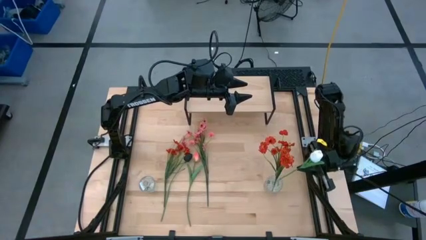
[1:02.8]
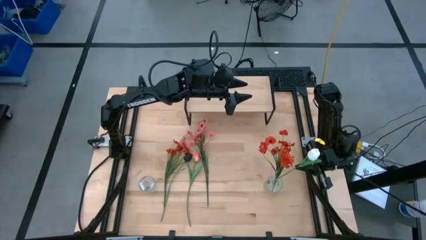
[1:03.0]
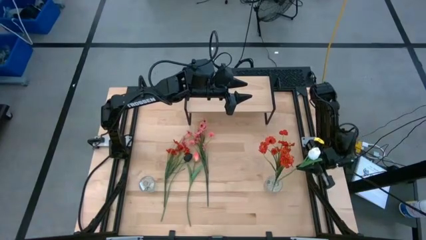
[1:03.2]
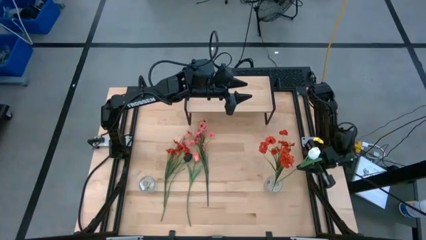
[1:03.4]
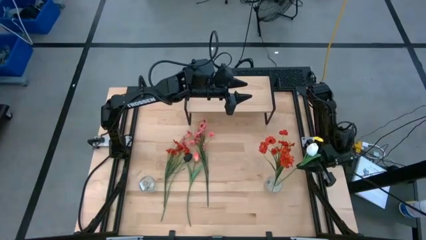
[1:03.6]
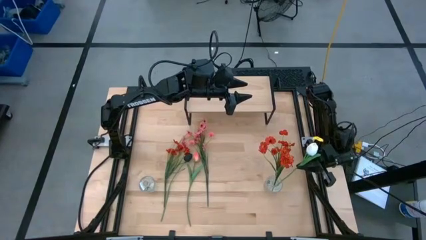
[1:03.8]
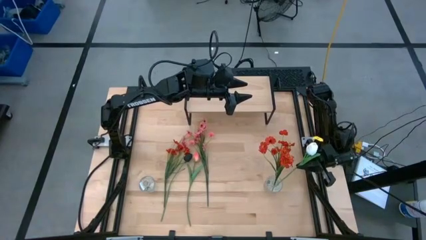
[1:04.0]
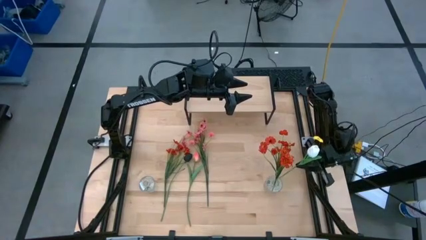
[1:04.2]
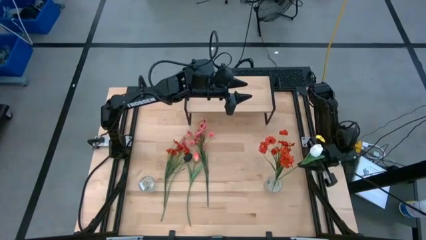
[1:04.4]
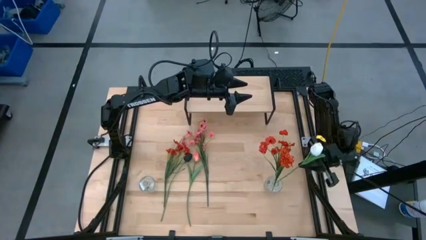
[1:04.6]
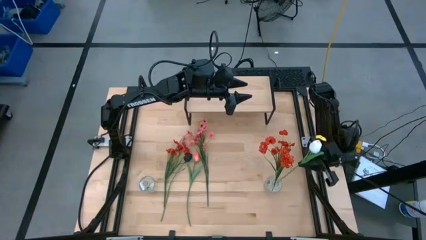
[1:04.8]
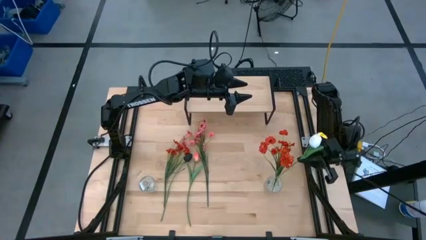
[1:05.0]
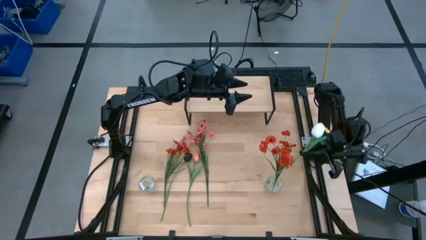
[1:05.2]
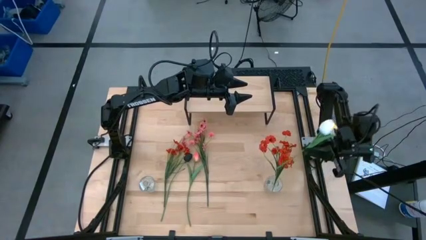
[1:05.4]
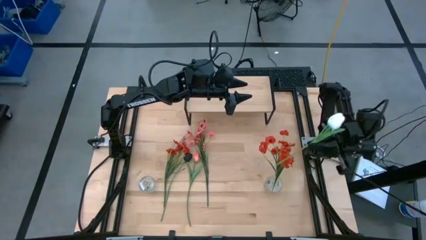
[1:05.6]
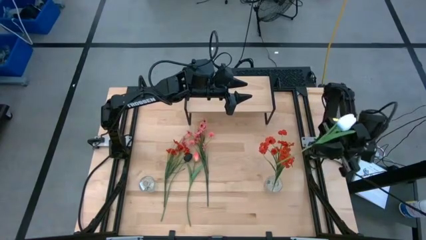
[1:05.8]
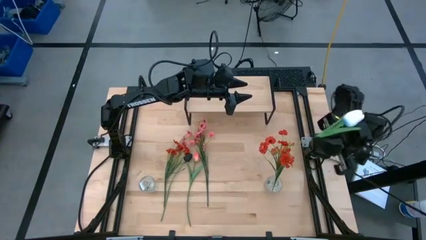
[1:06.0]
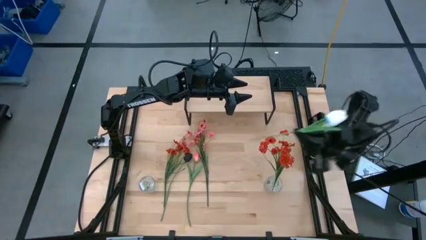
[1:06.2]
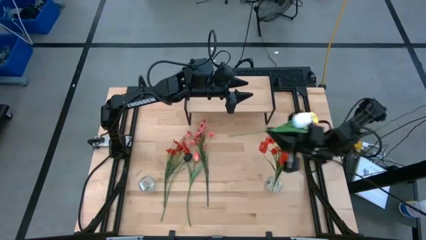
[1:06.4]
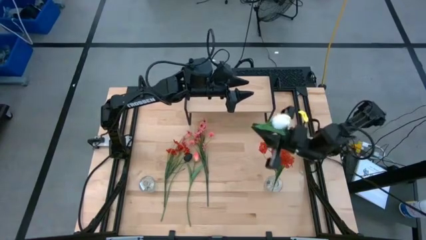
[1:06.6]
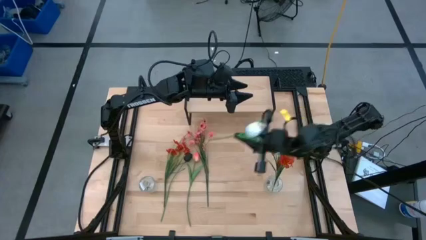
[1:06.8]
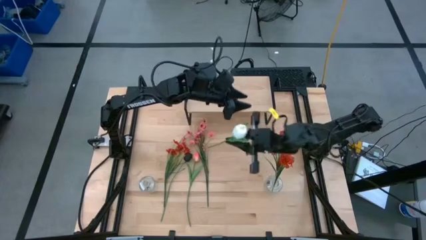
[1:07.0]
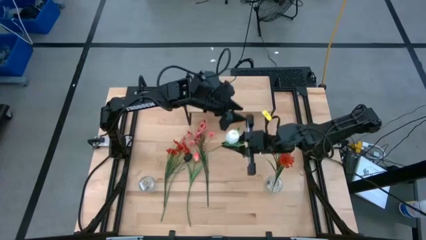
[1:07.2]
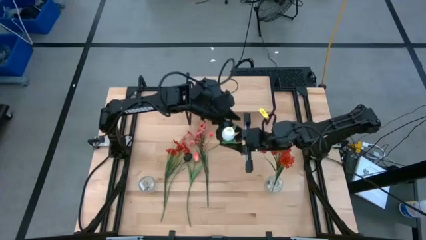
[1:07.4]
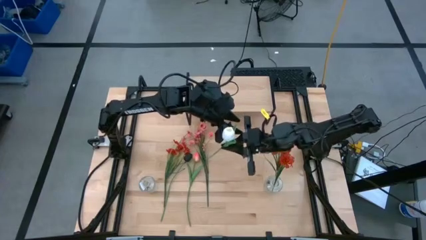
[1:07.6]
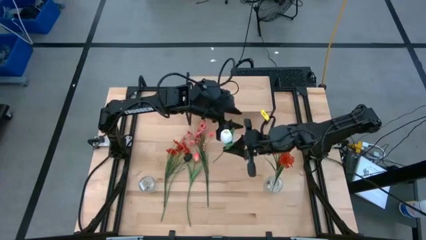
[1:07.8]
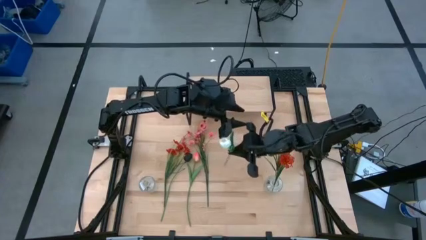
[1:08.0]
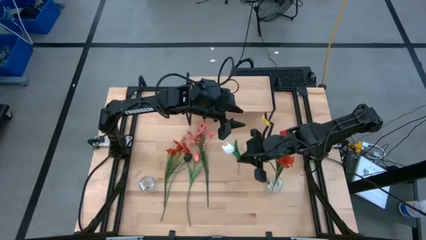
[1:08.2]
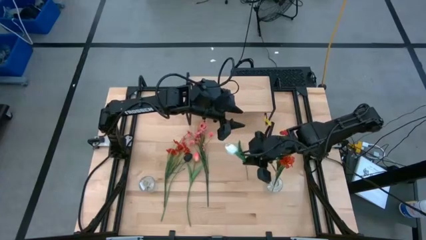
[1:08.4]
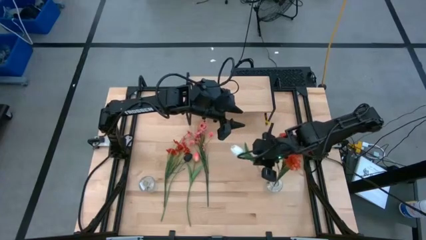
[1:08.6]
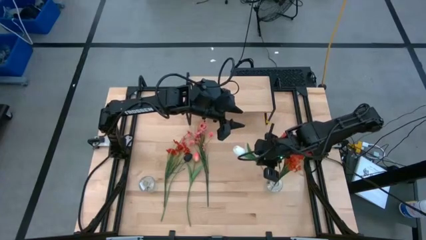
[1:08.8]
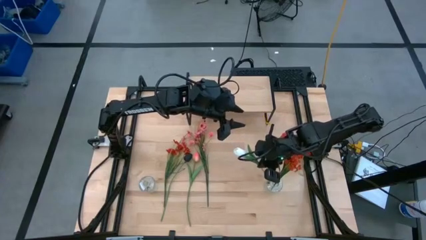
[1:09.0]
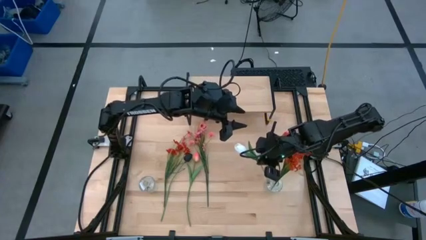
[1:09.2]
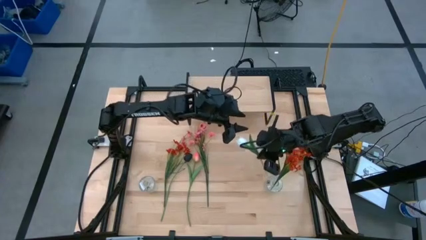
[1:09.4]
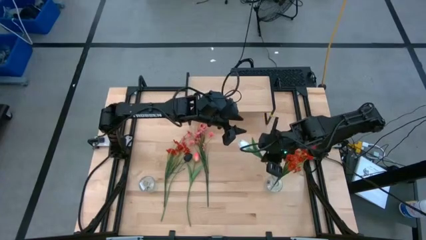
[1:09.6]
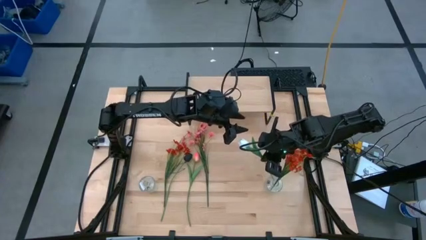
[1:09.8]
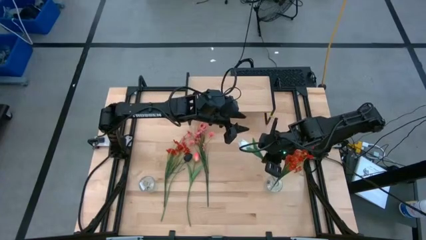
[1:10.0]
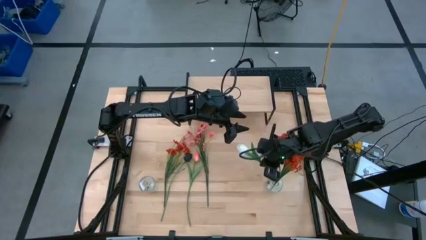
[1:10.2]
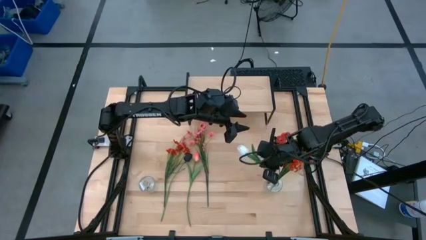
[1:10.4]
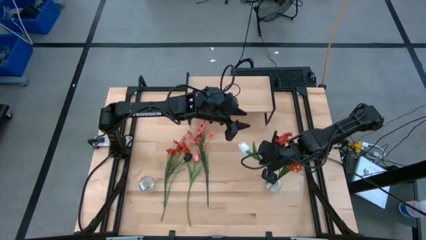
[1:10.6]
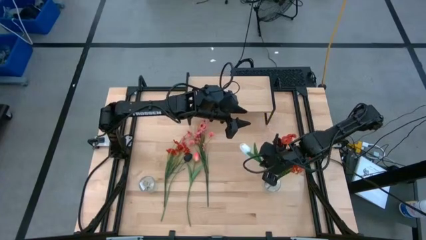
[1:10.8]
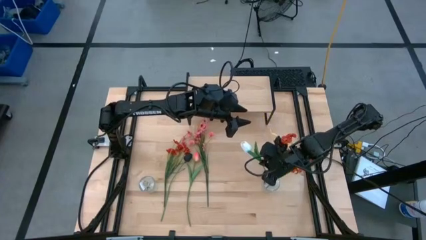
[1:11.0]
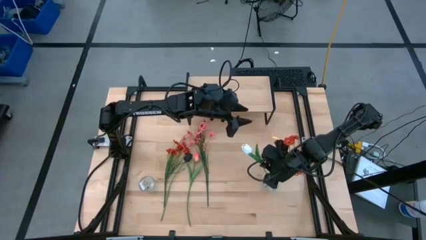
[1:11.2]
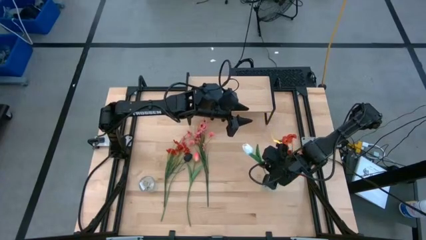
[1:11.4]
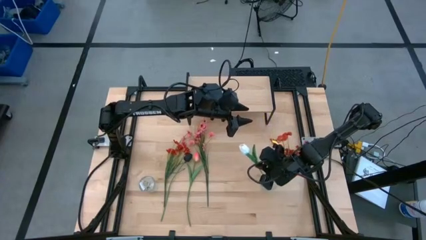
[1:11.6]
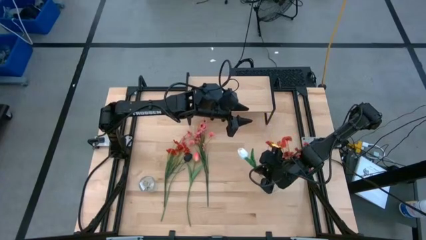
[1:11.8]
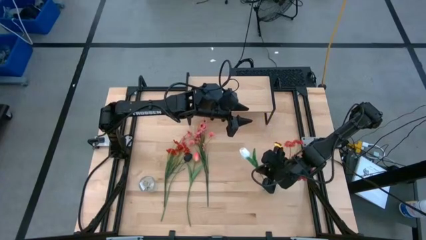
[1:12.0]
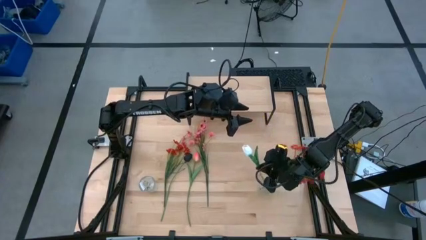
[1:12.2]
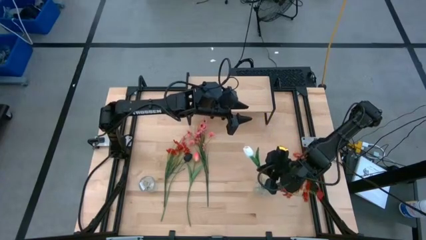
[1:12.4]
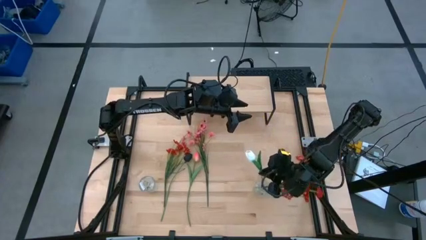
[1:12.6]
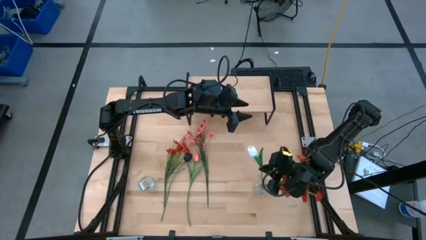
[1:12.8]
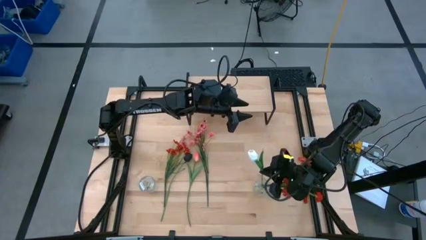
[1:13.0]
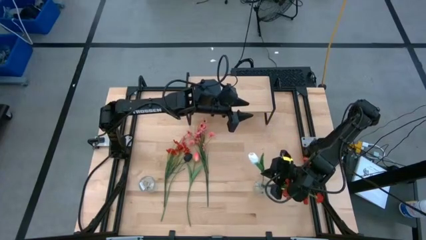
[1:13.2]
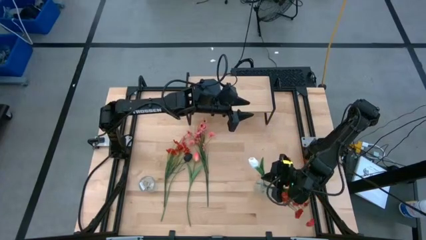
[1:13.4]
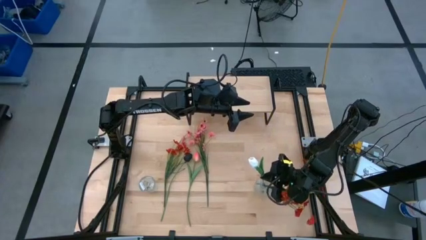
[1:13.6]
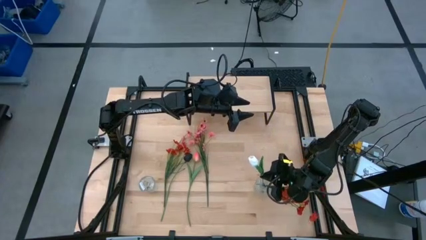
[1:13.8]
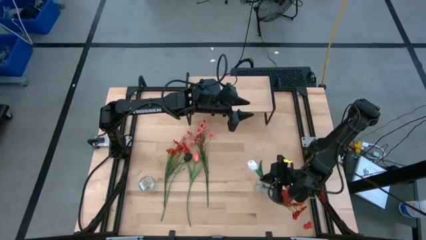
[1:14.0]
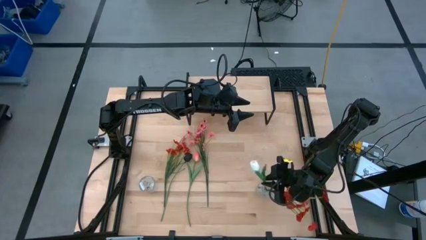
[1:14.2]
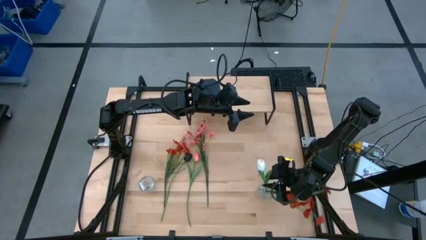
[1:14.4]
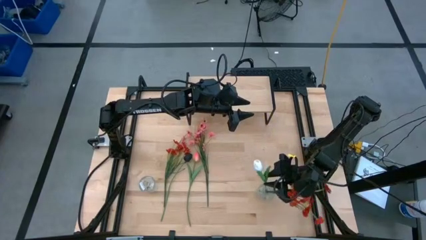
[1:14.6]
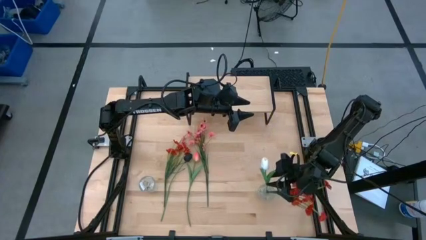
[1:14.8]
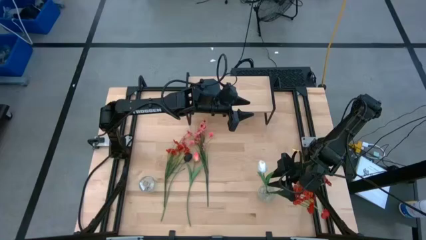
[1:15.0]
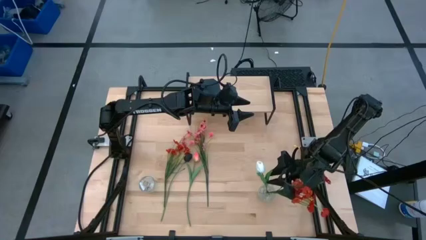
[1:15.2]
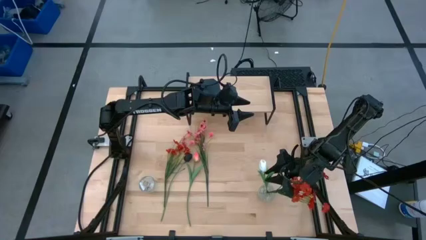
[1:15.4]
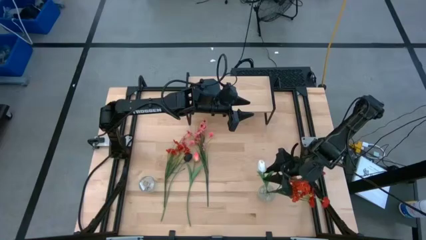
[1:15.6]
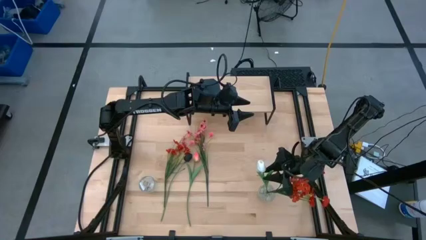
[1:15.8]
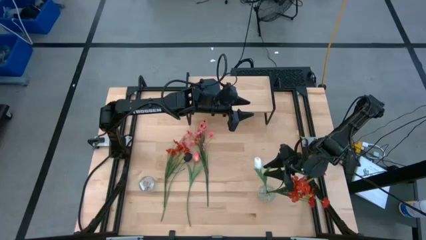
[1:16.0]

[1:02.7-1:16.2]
Task: Pick and place flowers into a vace then onto a shelf
Put the white flower into the right transparent vase

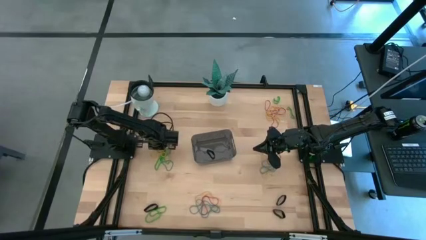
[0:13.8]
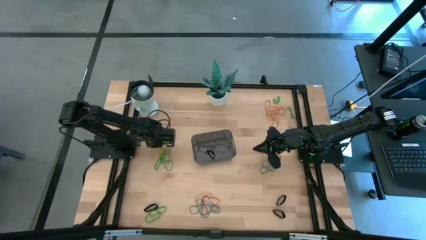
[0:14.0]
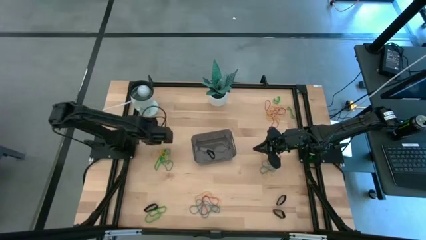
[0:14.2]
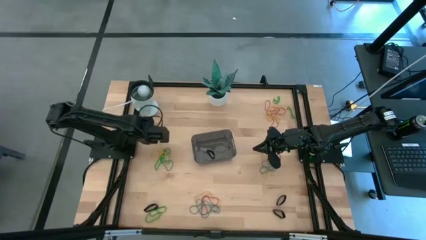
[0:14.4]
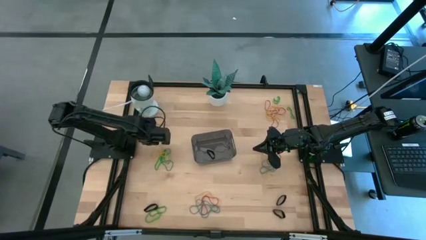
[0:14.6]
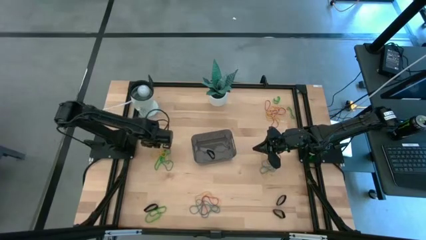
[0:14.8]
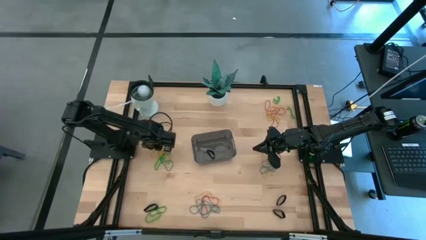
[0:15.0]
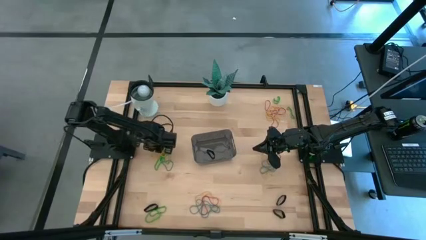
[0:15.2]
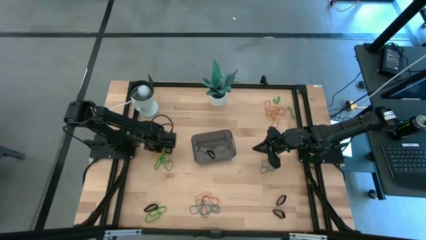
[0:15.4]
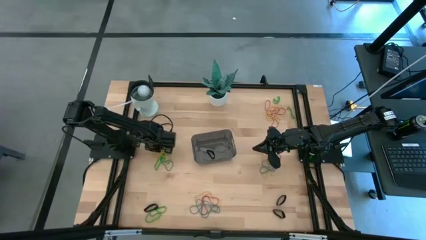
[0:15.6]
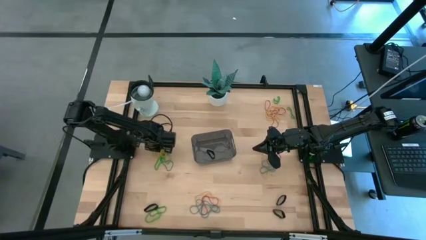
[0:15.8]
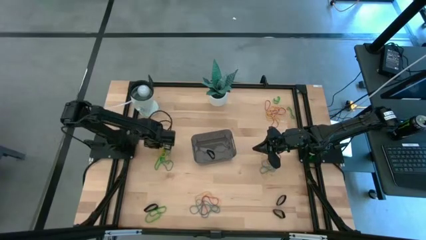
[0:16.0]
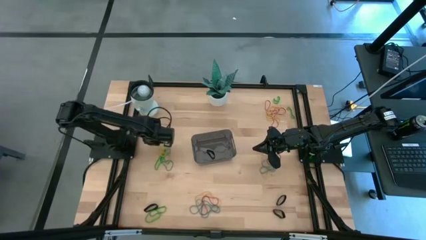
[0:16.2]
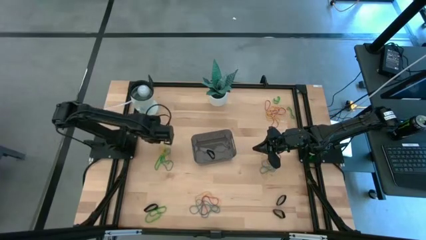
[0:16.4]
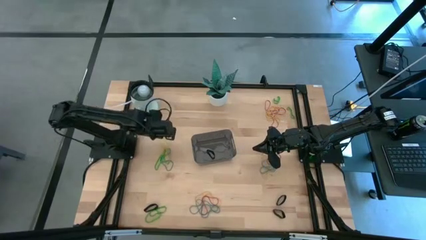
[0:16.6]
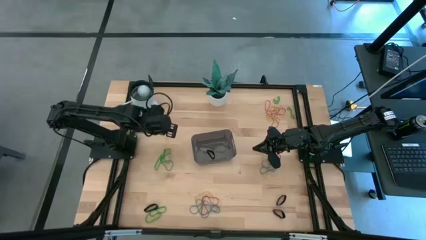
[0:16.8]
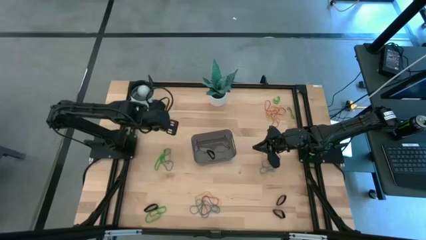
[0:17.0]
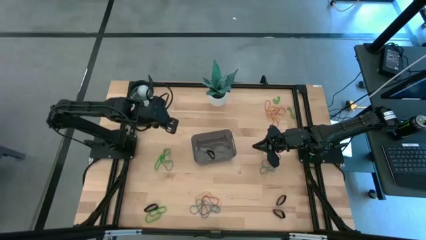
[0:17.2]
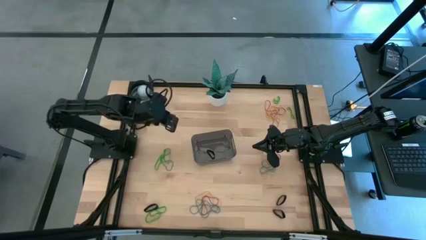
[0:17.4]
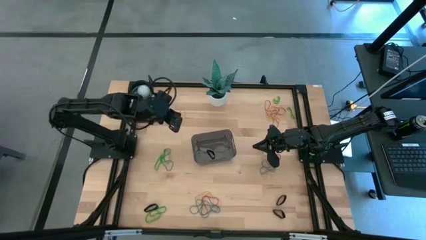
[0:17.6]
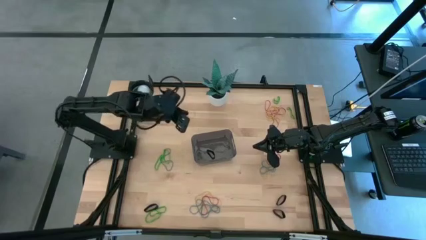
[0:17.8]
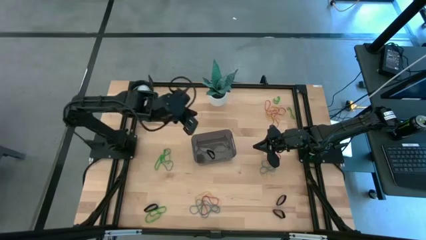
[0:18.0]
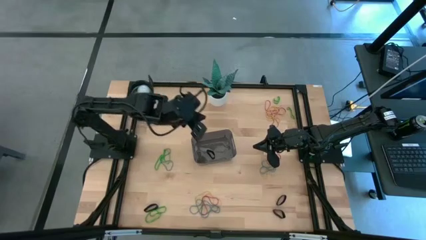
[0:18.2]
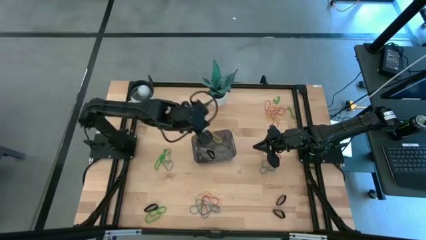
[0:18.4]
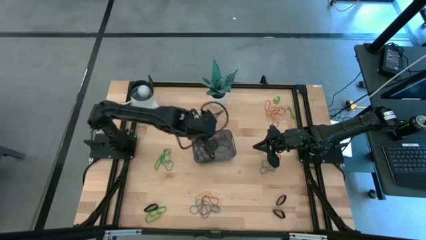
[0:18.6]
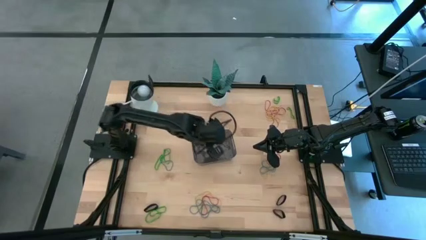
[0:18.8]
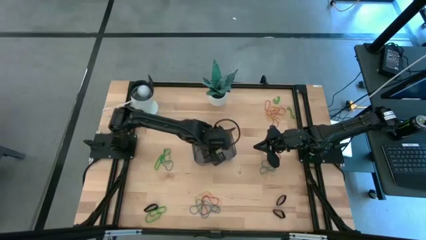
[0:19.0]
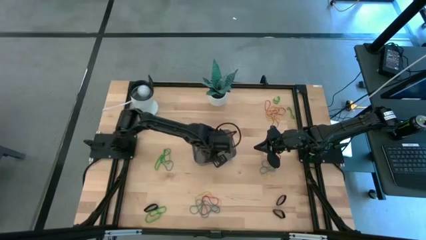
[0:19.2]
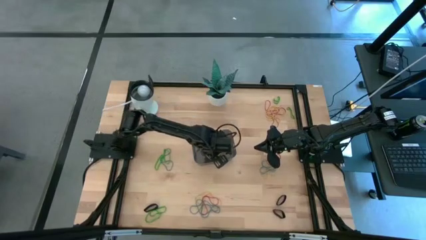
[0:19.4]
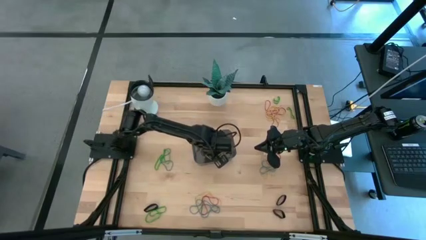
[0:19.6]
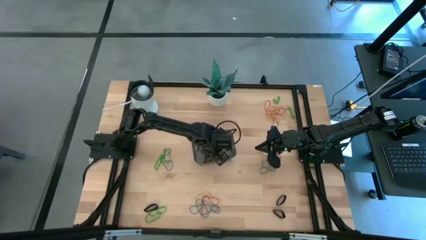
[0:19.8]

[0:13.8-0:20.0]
Task: Pick and place rubber bands into bin
Put the yellow rubber band into the black bin
